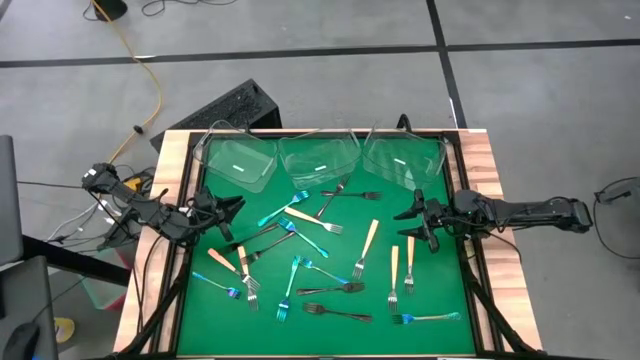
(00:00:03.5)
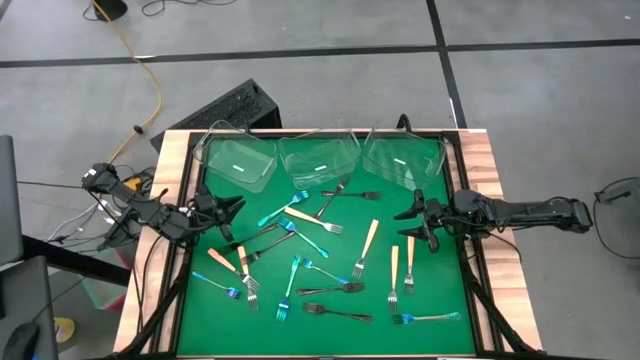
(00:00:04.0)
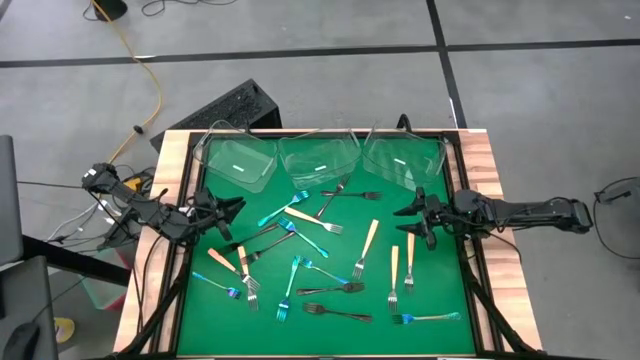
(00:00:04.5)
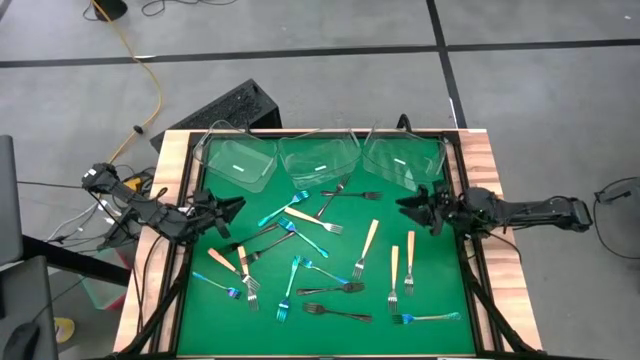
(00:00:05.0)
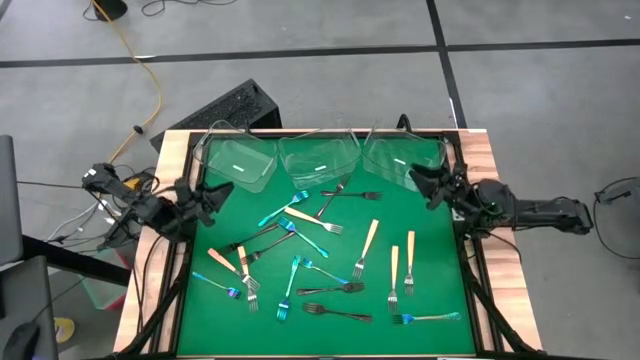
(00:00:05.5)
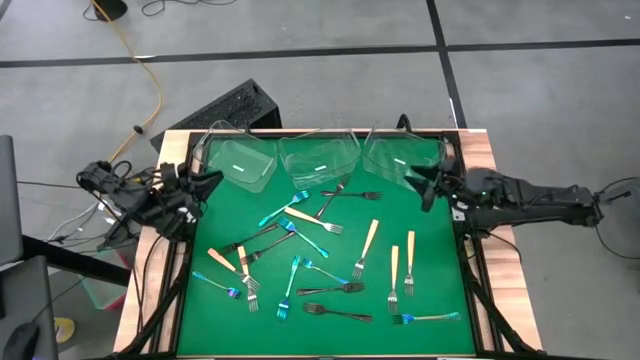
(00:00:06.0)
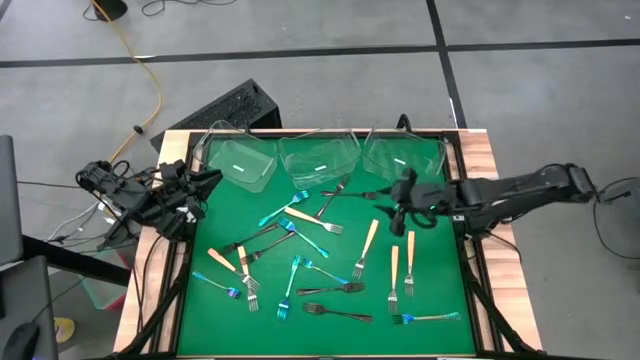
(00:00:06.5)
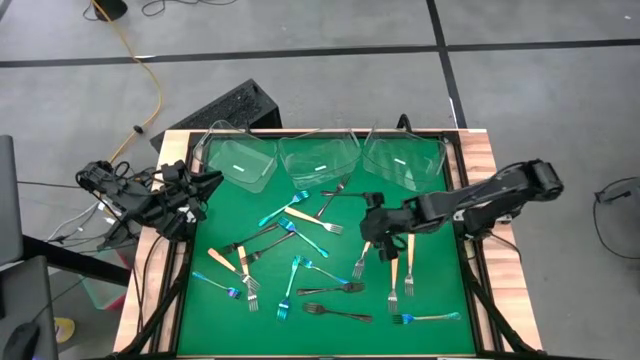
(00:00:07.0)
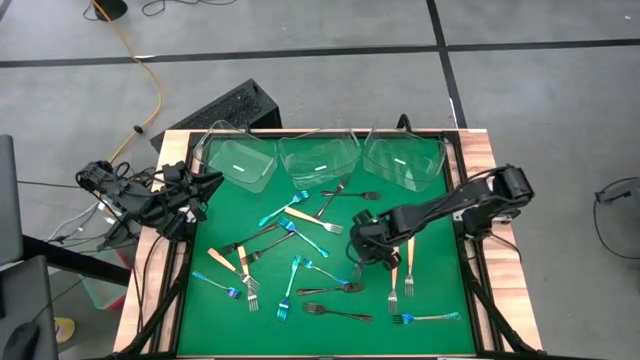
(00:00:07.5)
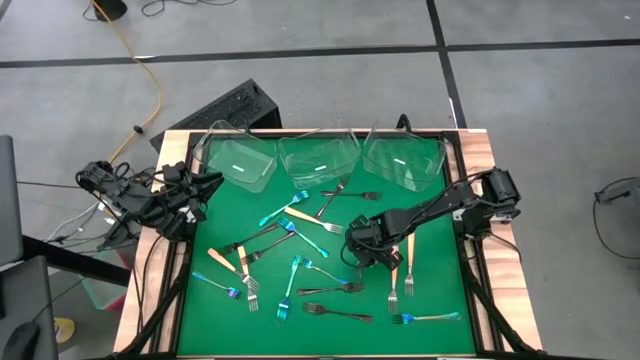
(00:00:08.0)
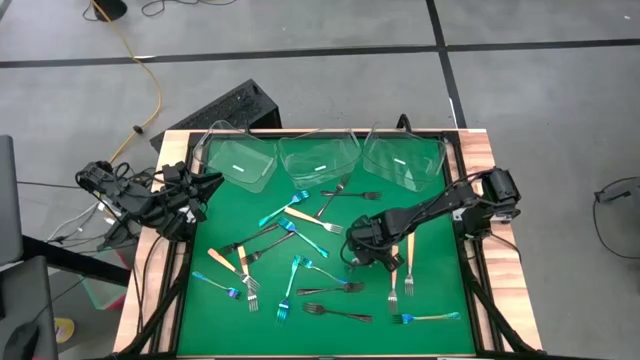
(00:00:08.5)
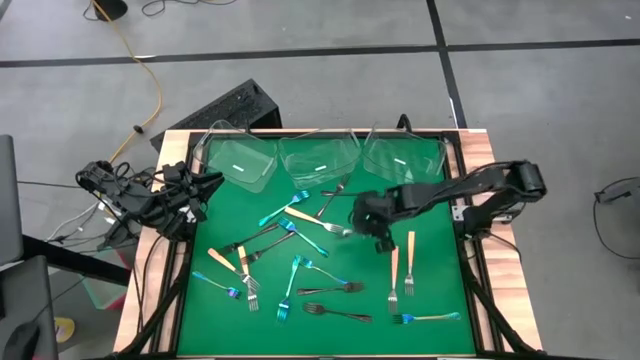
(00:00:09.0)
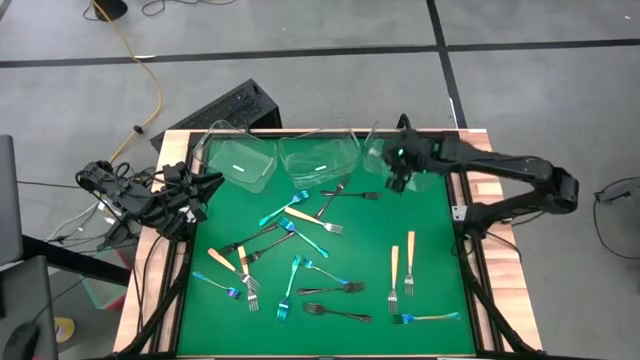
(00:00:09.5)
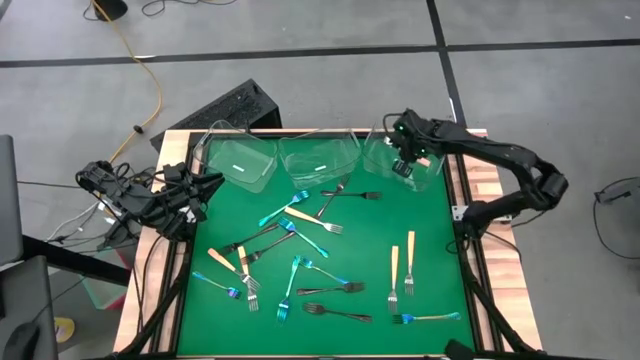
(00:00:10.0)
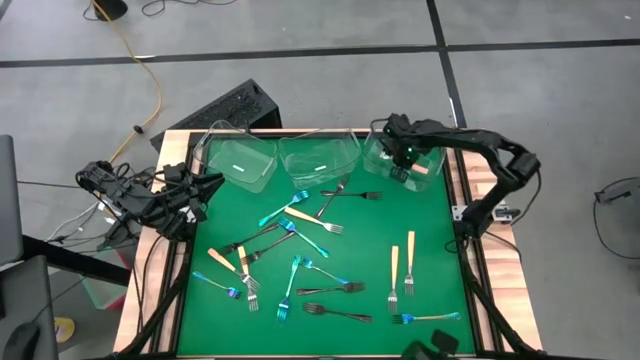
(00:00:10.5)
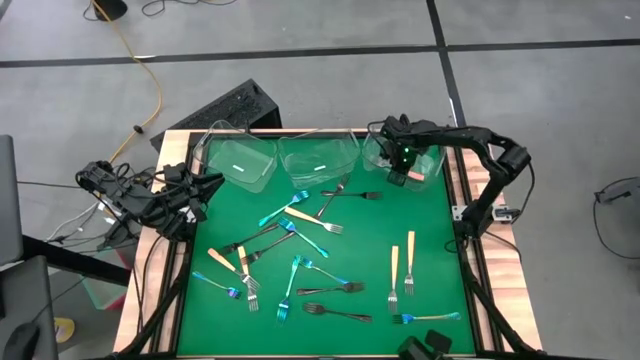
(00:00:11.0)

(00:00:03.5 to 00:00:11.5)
Task: Sort silverware by color (type)
Put the yellow fork into the right transparent bin

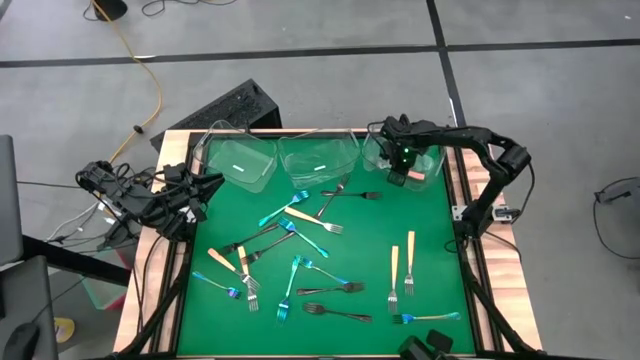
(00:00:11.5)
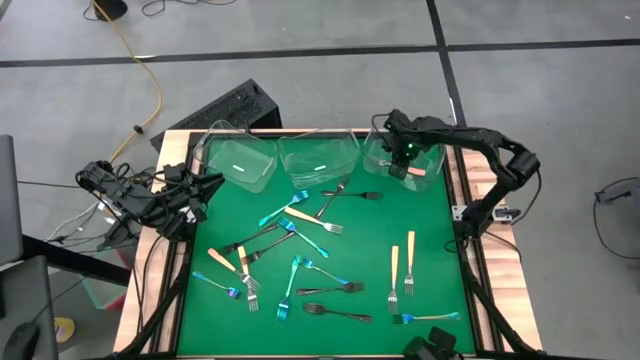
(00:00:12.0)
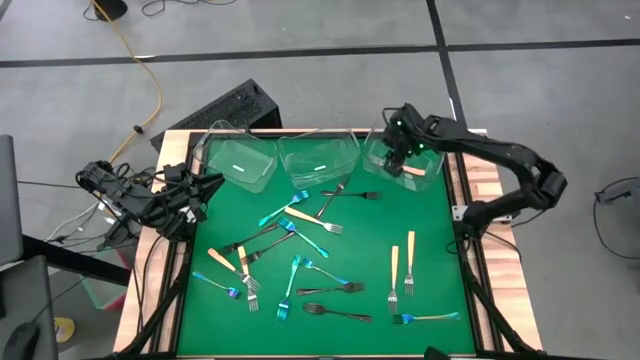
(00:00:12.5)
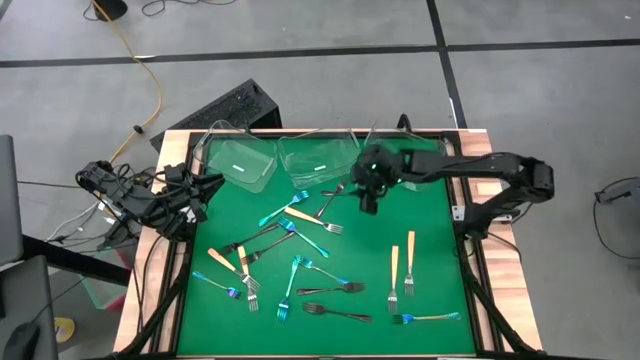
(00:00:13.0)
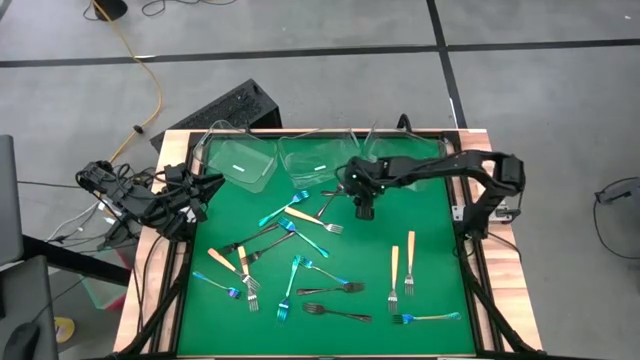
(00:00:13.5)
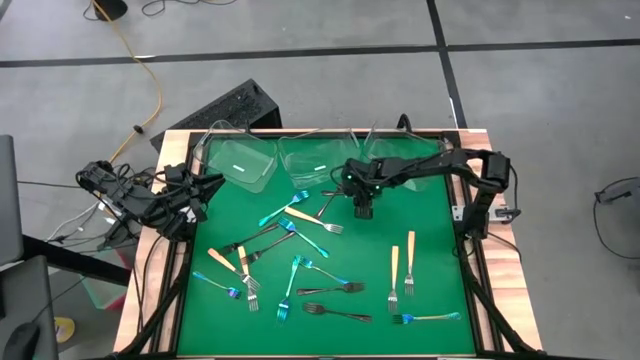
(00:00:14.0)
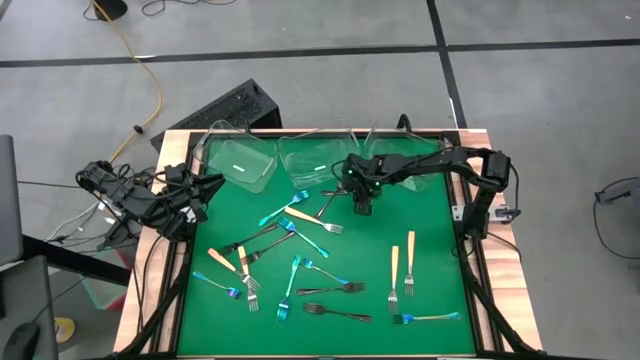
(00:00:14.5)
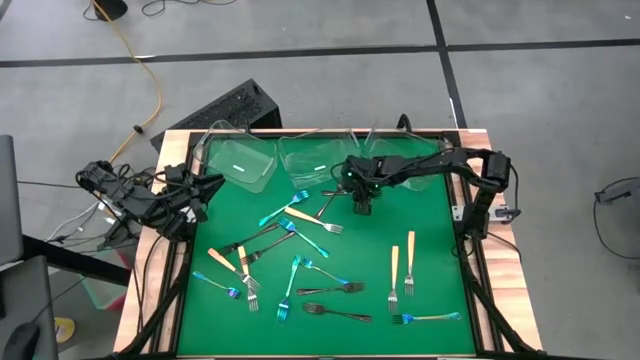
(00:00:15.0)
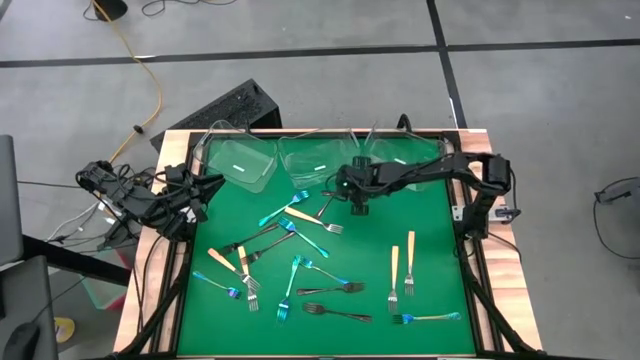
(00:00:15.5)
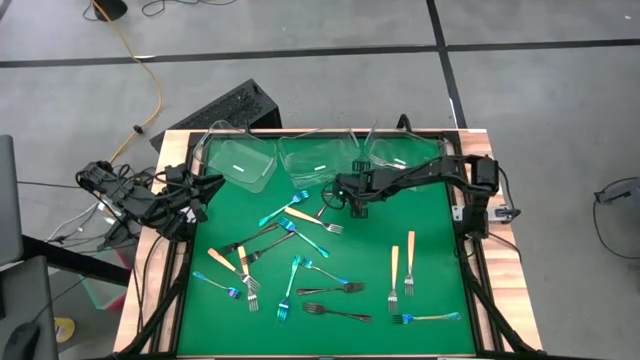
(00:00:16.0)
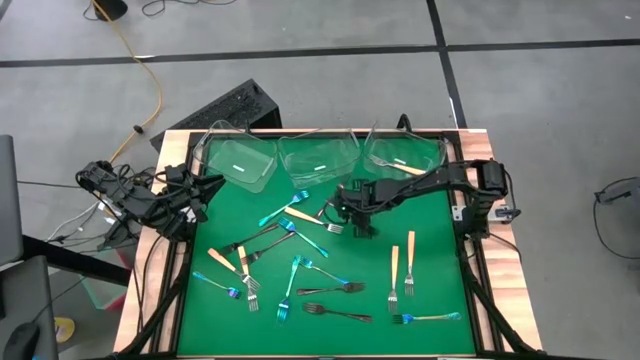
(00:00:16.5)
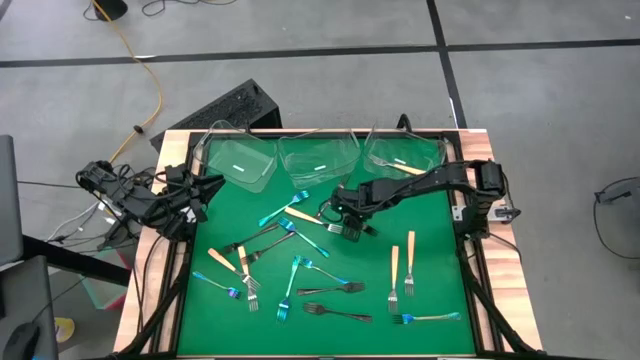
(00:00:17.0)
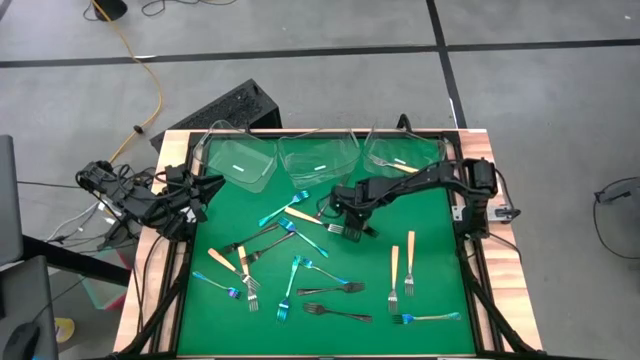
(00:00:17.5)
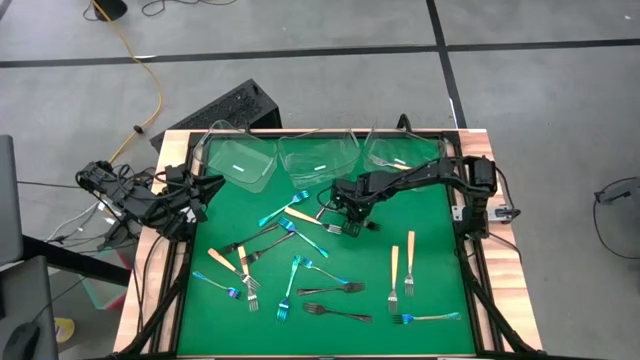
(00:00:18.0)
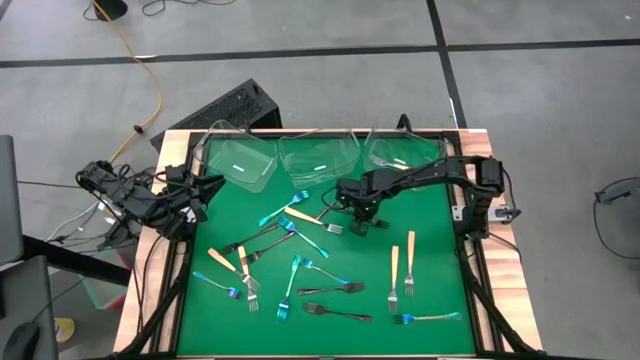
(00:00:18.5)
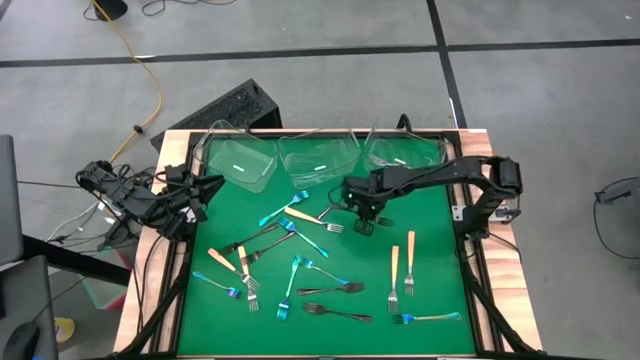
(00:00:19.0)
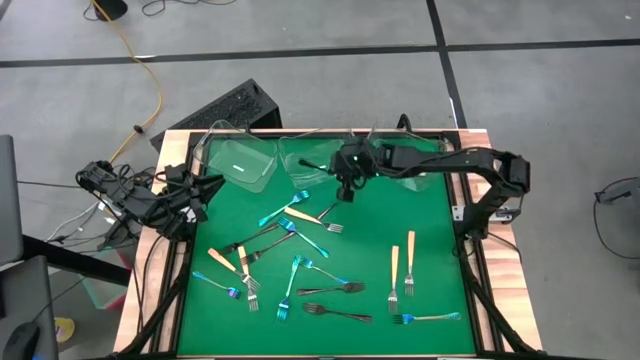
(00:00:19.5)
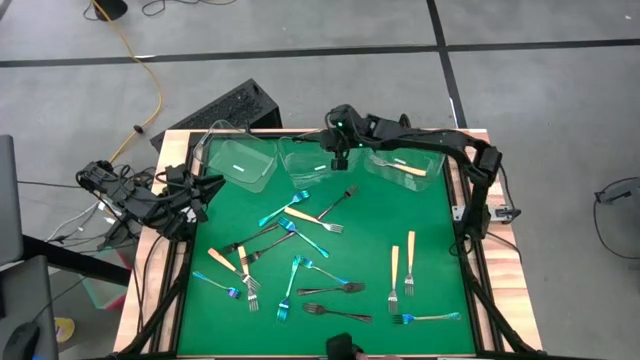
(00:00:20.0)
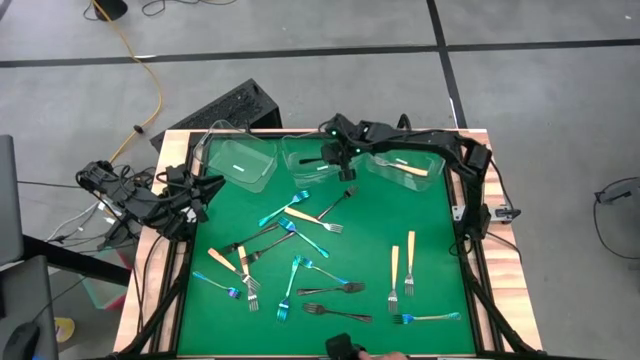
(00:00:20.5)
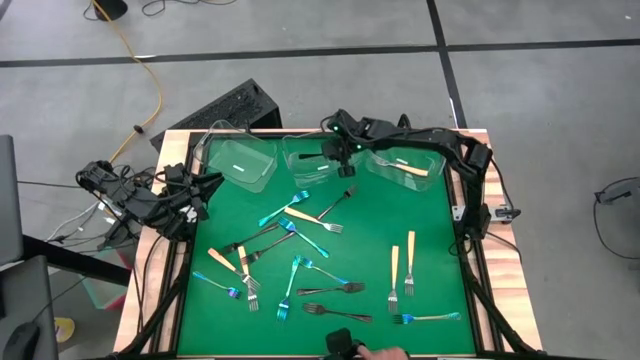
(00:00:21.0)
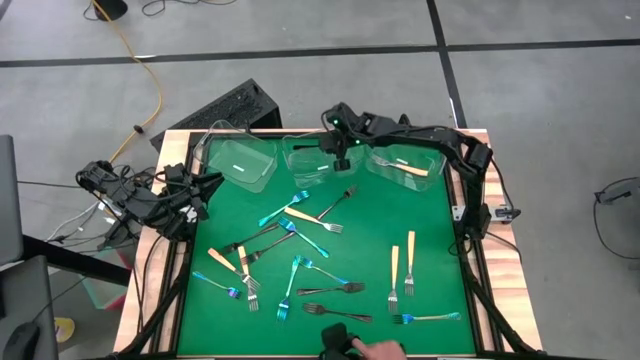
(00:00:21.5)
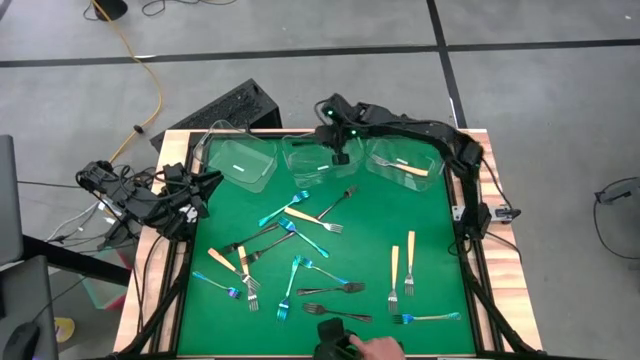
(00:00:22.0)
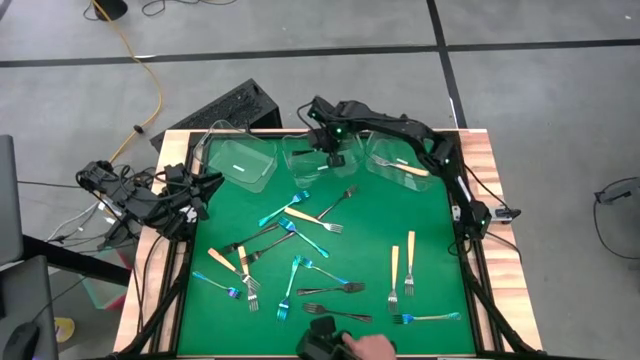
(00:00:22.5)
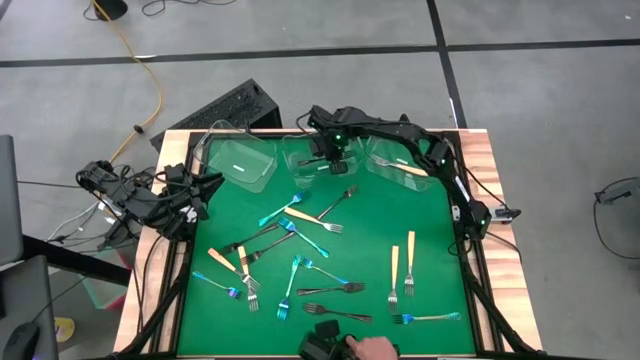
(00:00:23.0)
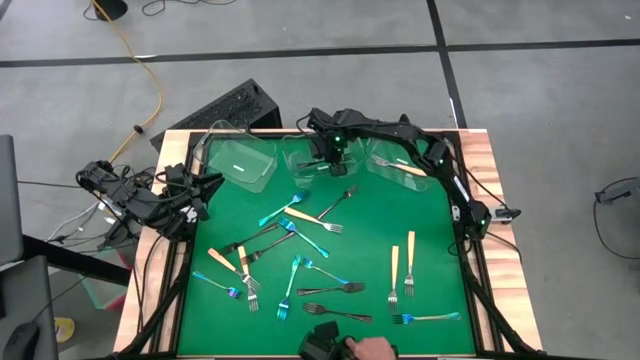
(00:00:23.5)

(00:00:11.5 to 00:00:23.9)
Put the brown fork into the middle transparent bin
